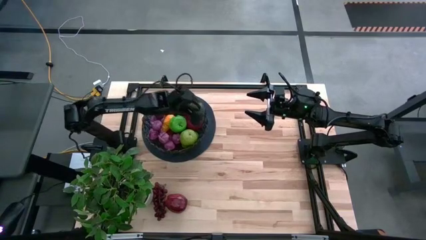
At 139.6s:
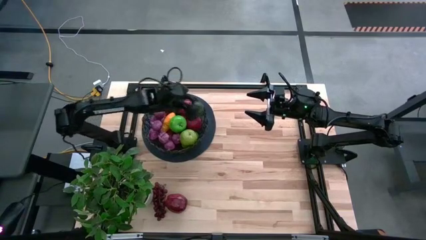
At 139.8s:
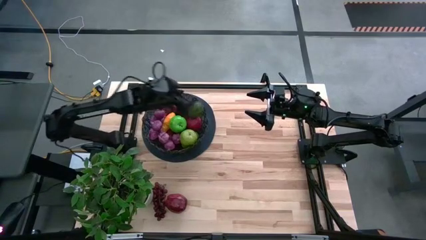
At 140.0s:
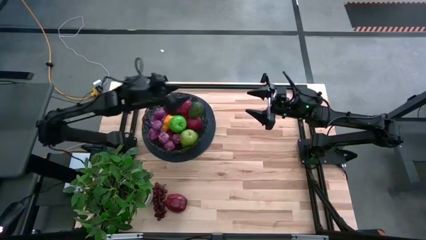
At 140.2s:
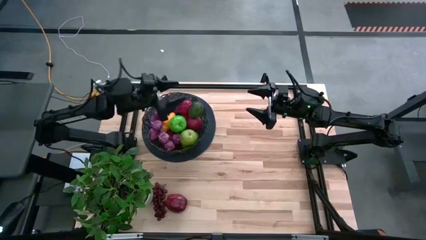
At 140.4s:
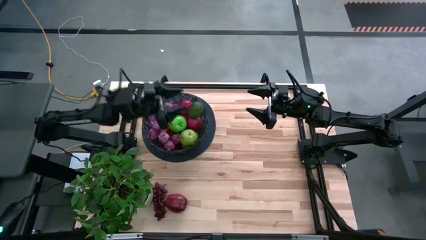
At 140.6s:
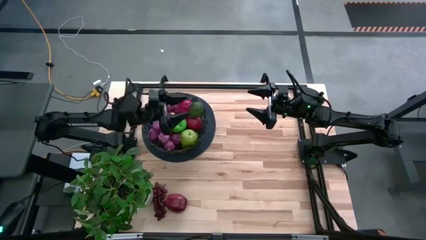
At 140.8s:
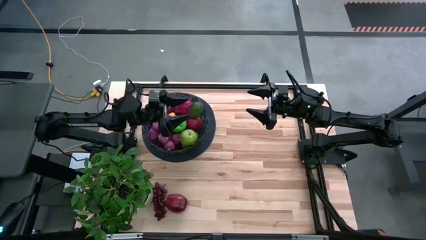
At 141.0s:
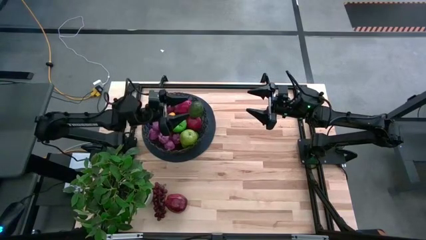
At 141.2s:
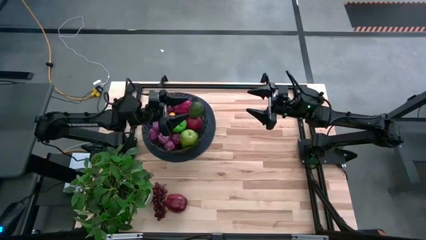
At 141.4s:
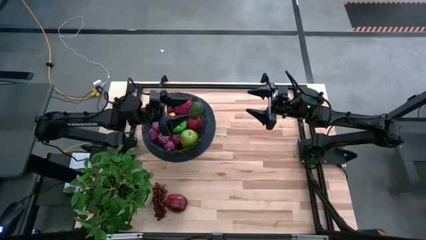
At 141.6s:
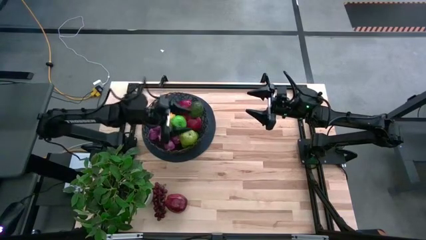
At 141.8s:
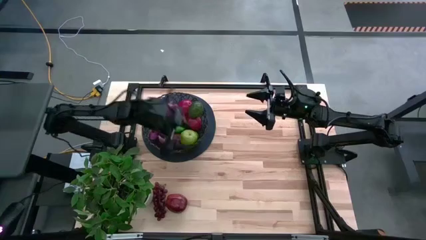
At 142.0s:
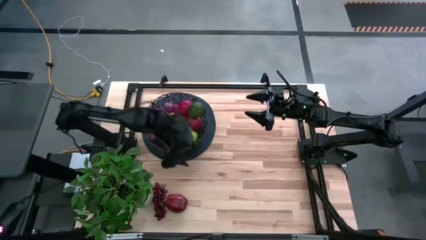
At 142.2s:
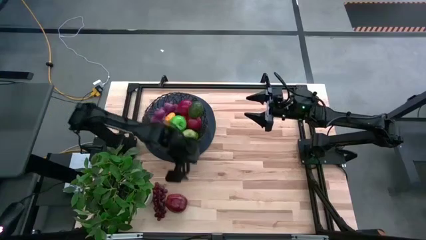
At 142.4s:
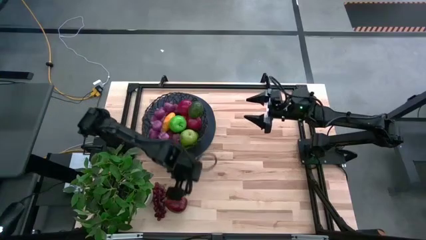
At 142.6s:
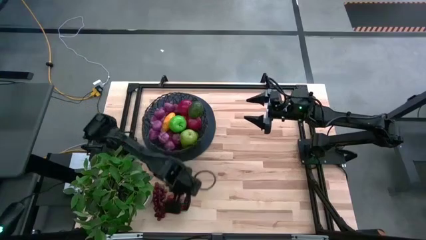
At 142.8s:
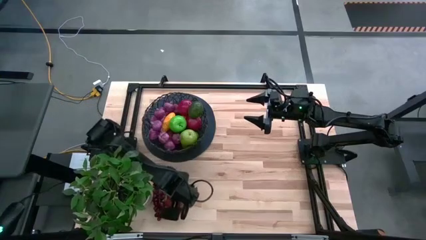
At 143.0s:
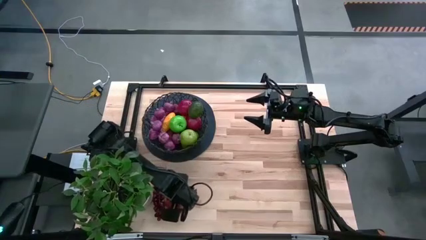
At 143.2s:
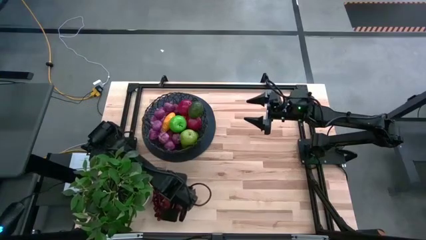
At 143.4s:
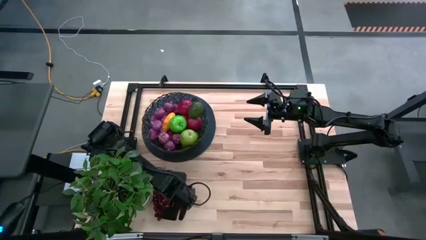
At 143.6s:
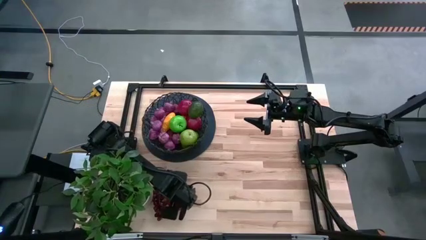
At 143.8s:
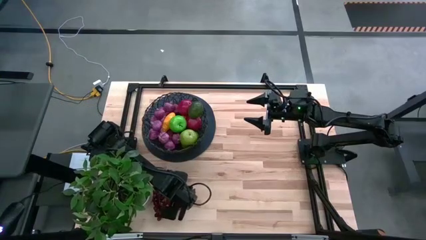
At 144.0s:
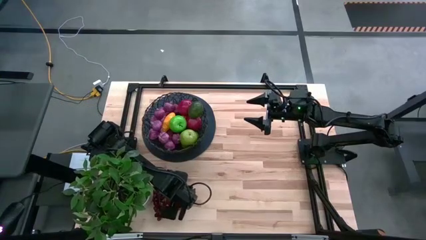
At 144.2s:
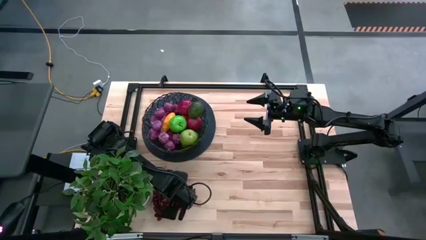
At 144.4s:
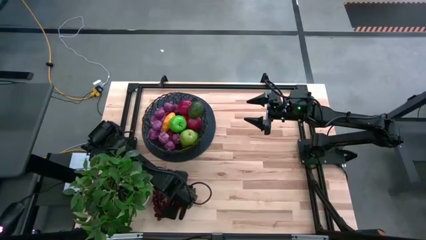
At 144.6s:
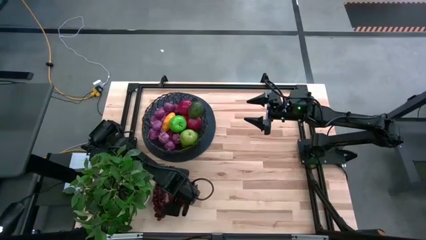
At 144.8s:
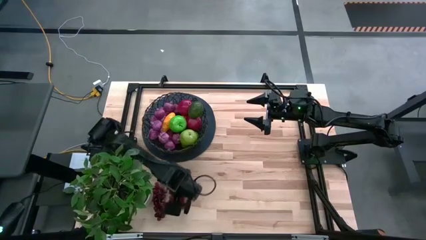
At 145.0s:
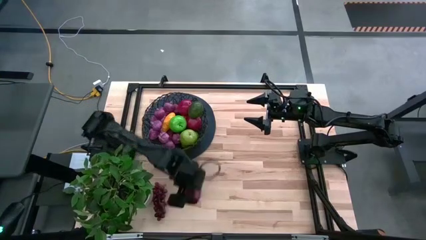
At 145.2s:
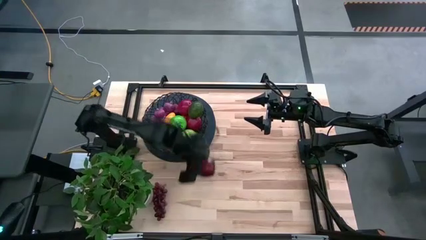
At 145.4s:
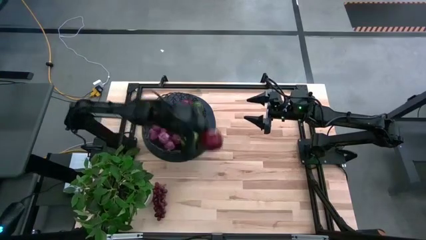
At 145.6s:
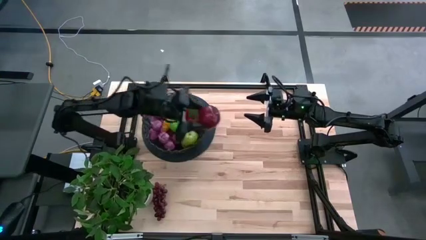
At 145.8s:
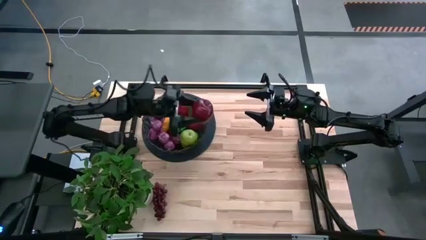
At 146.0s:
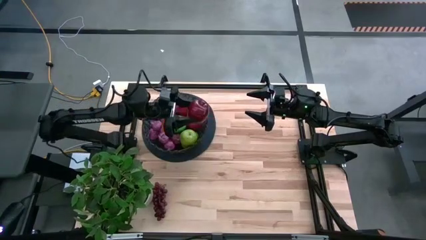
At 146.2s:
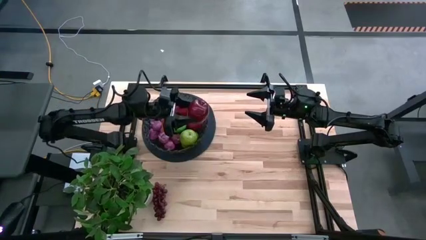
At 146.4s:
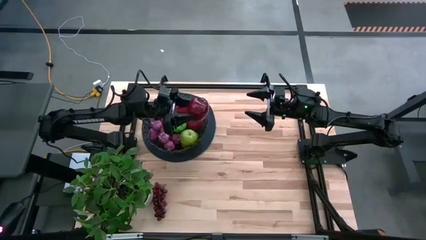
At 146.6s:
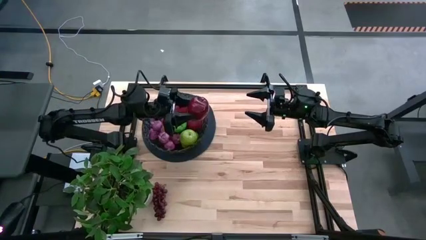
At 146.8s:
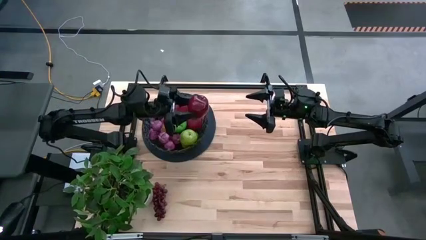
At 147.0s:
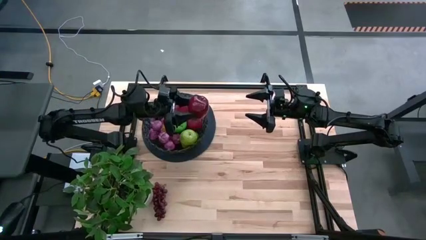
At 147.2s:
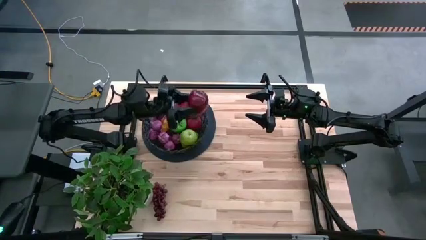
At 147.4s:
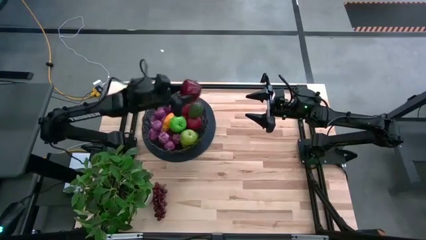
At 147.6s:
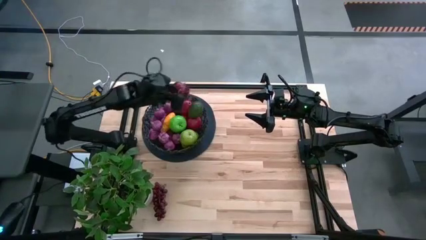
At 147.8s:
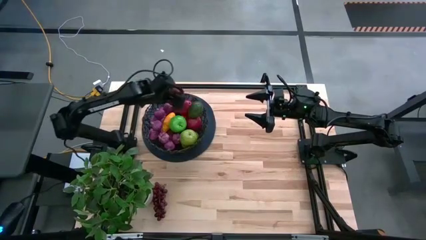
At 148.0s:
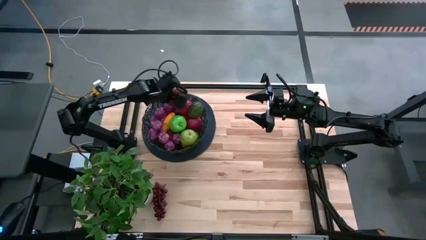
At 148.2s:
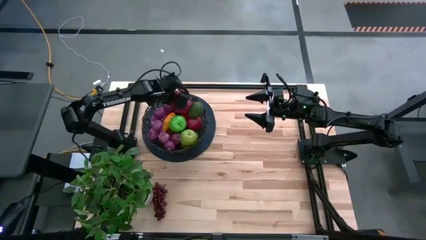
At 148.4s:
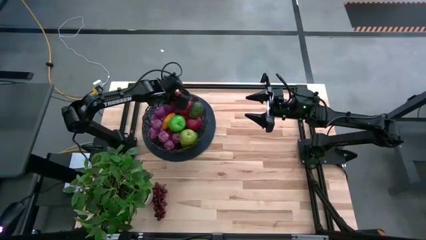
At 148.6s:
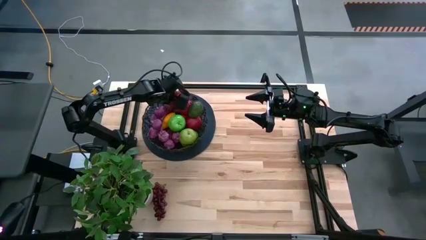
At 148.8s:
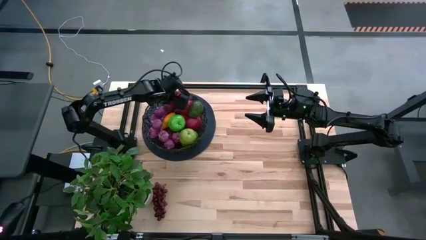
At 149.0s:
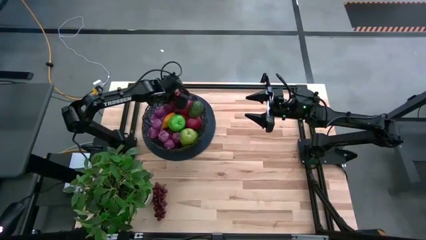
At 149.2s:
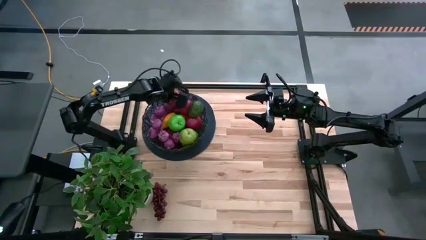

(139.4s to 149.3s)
Task: Build produce basket
Put the red apple into the wire basket

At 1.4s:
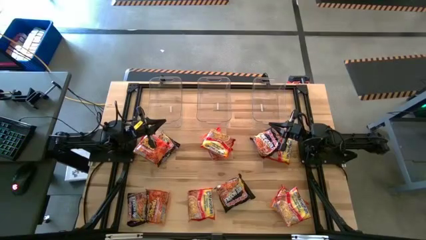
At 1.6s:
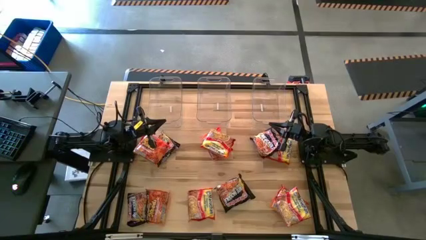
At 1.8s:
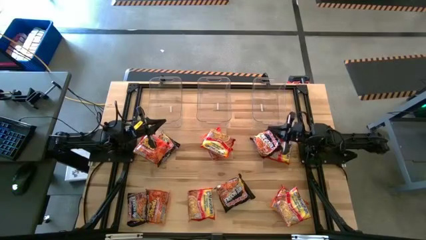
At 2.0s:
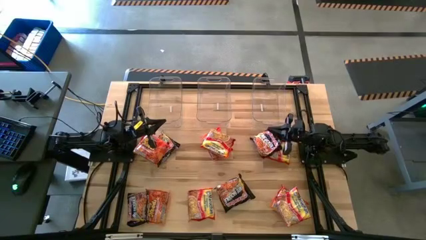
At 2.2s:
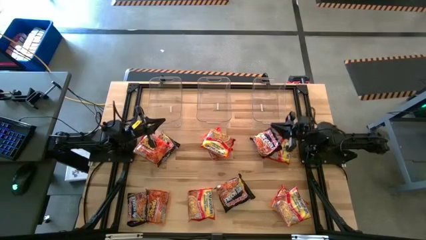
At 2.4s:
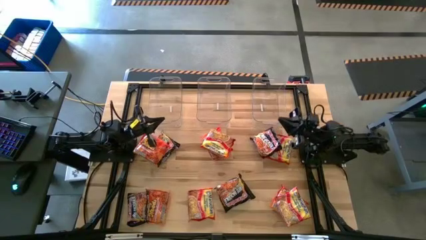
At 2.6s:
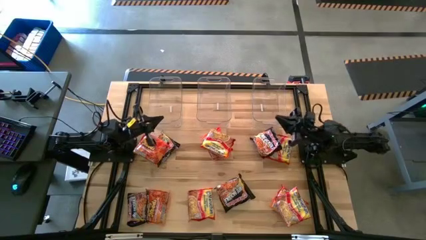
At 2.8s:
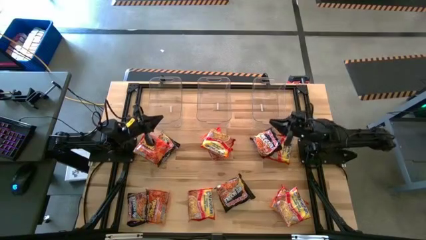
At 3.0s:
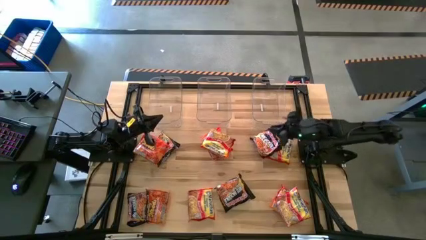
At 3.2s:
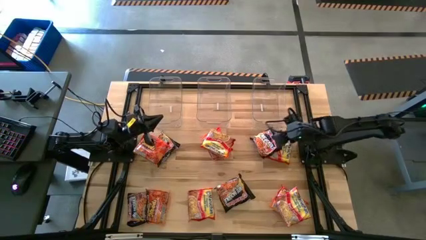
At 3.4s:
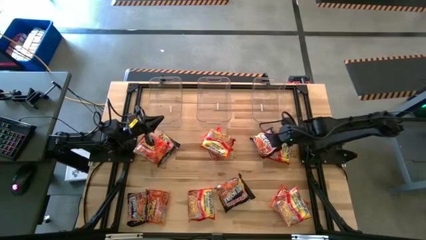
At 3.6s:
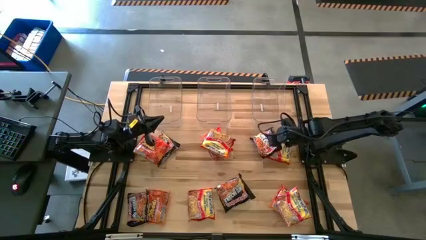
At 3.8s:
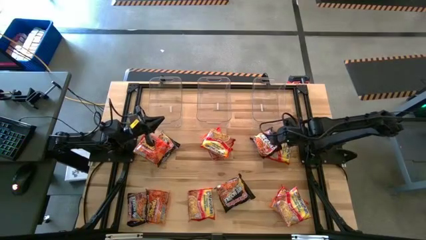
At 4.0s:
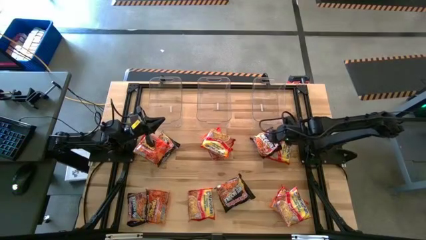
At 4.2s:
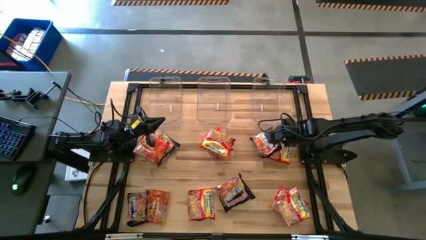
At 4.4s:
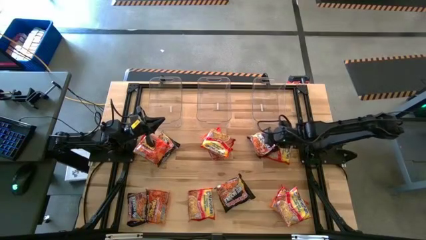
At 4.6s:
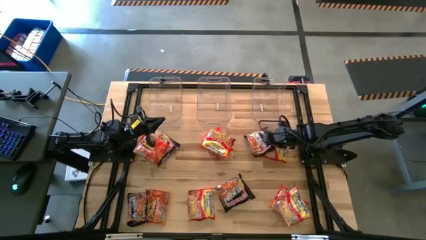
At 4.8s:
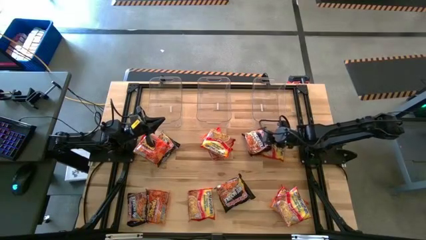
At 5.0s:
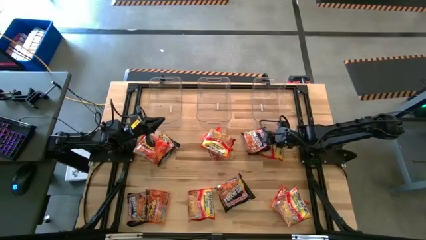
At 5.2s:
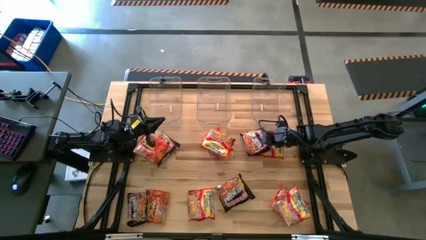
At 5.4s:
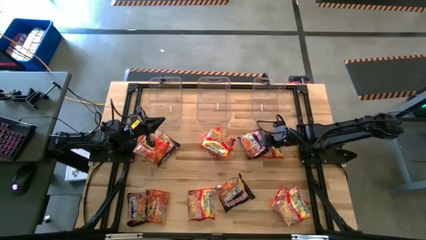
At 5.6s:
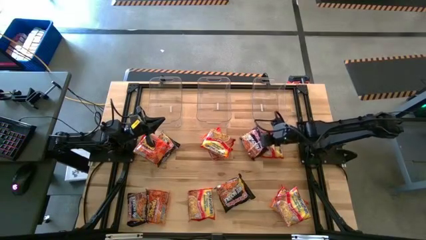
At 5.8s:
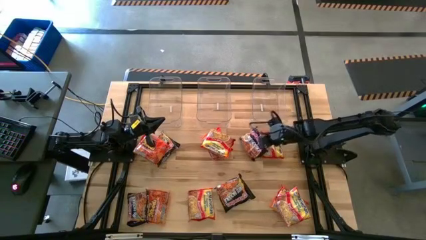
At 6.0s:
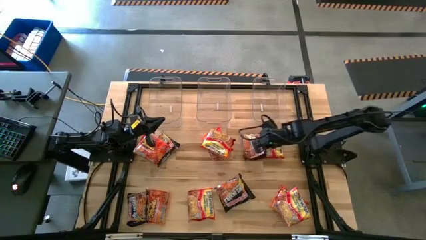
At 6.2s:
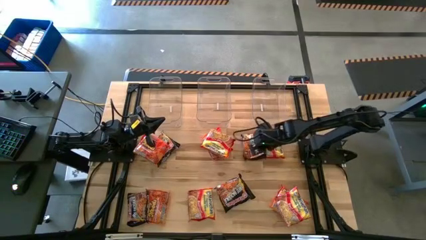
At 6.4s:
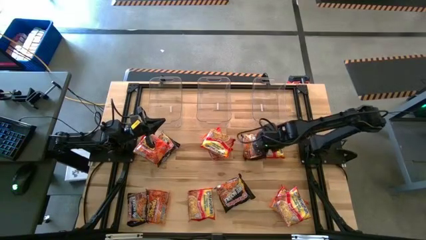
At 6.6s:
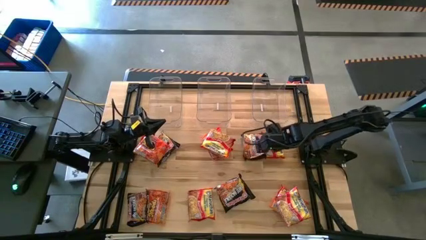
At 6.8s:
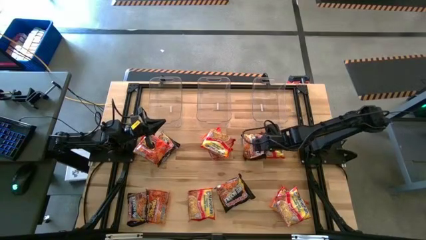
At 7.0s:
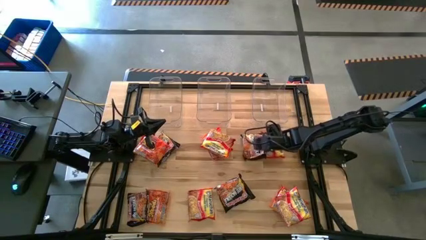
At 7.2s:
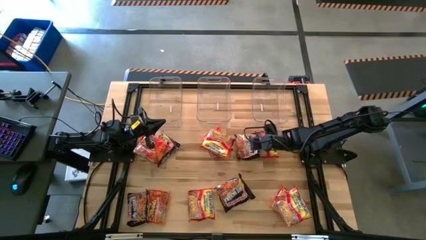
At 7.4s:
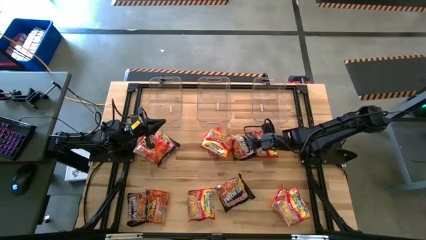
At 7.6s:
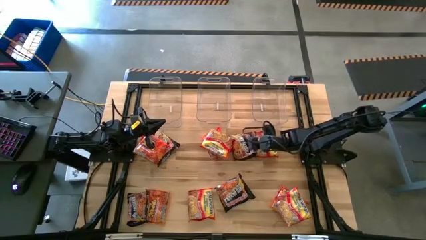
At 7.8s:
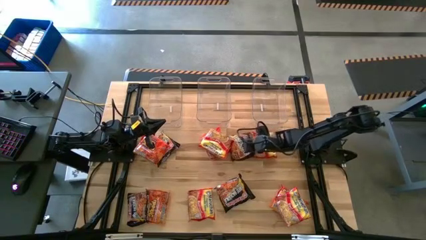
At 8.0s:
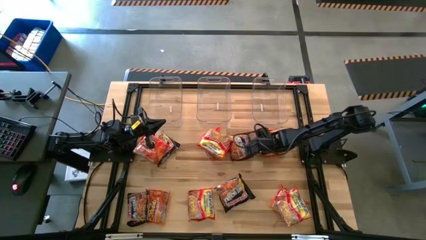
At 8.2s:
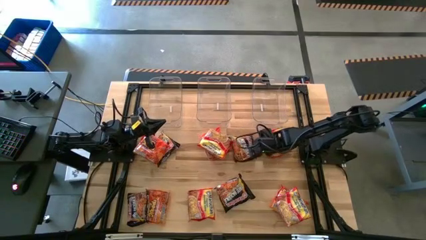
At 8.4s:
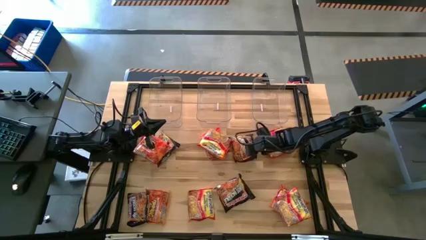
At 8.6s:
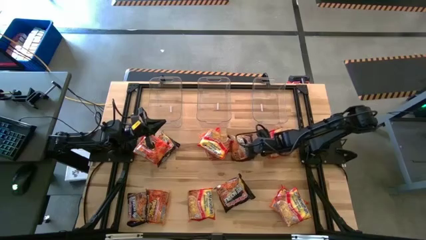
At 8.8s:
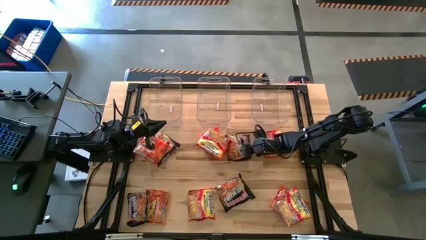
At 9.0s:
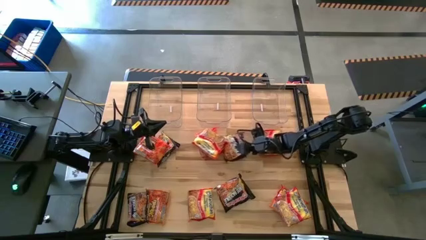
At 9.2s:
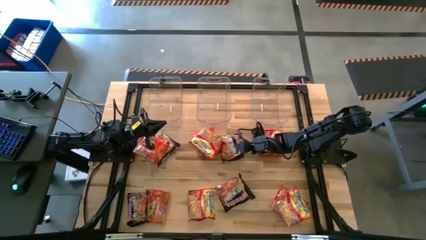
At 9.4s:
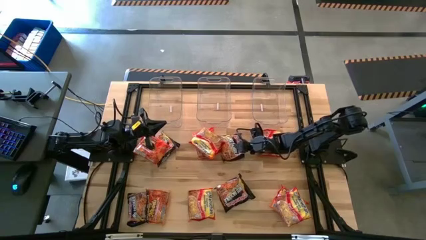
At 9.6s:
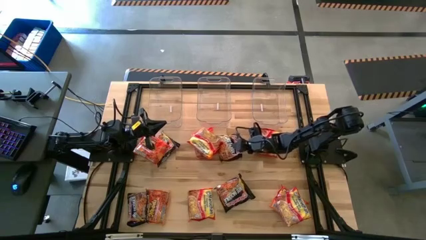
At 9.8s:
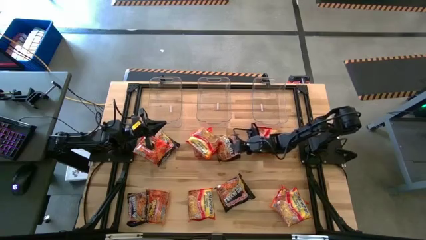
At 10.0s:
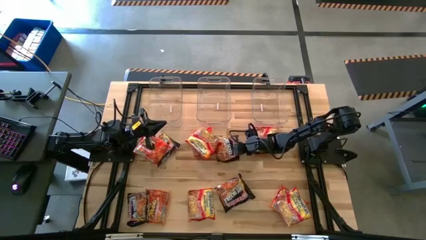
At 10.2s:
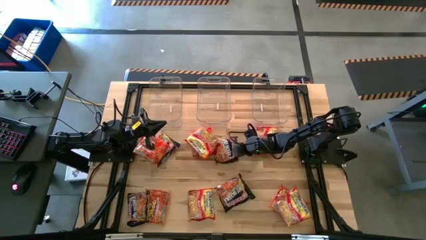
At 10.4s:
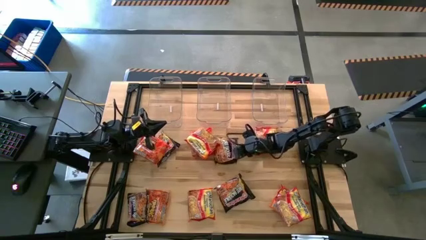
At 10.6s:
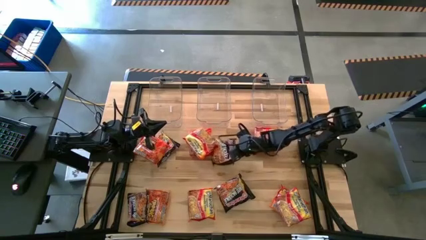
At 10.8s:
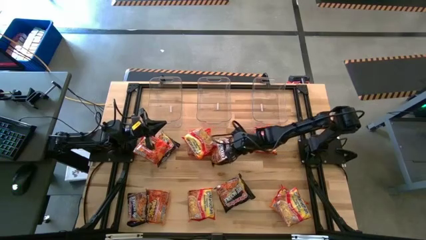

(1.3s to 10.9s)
Task: Sort Maruchan noodles
Put the black noodle pack into the right transparent bin
